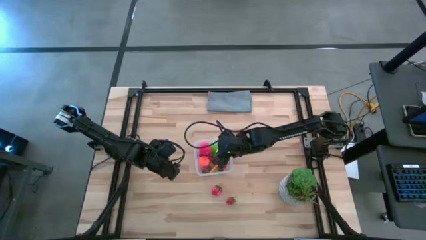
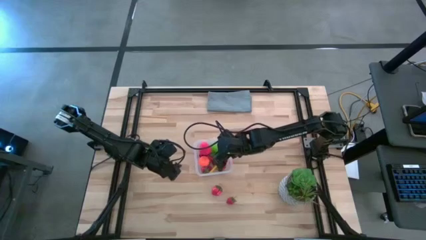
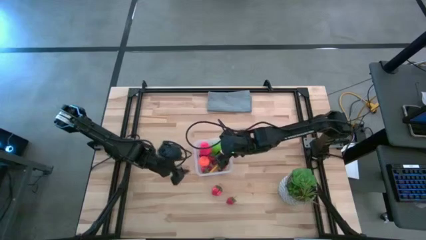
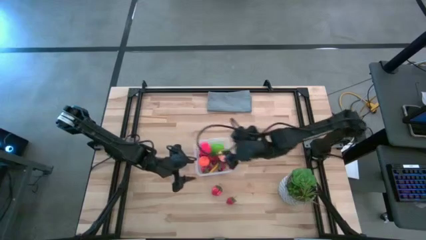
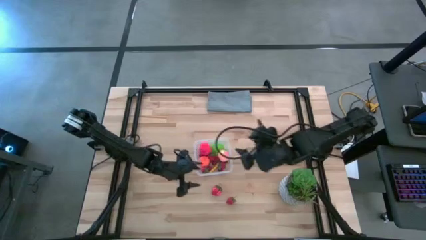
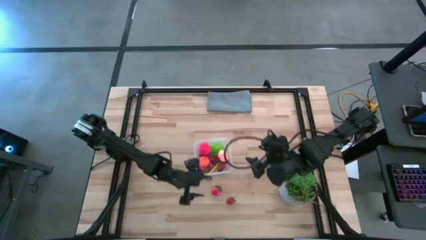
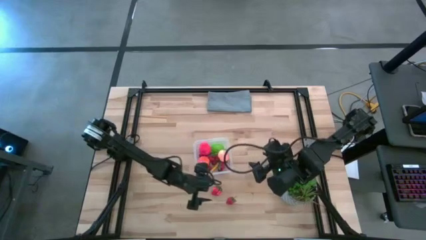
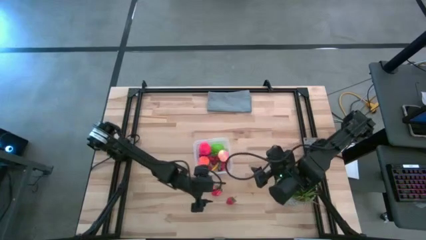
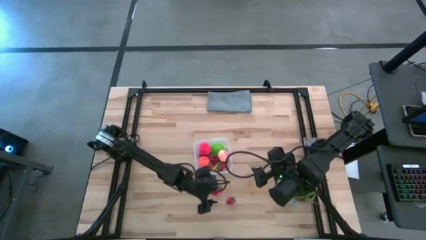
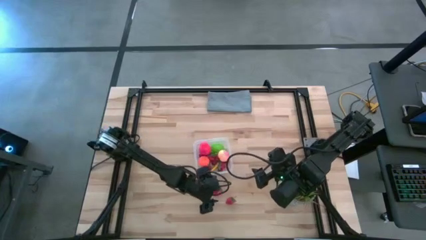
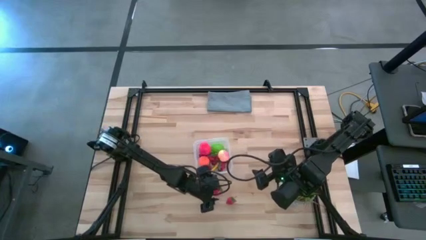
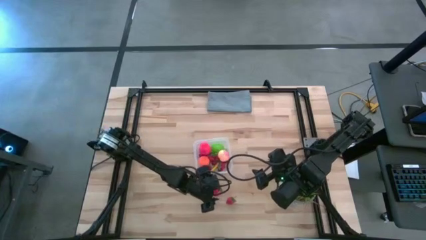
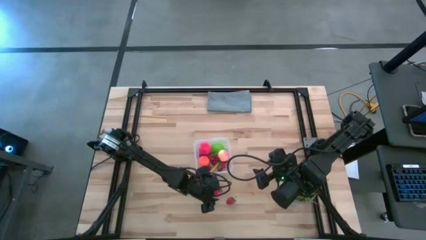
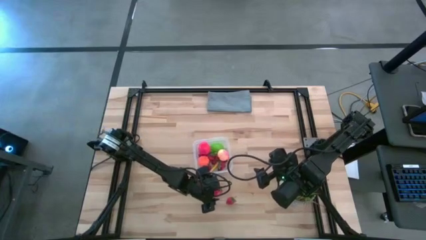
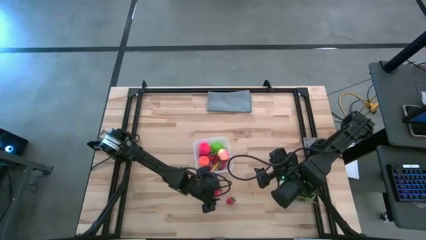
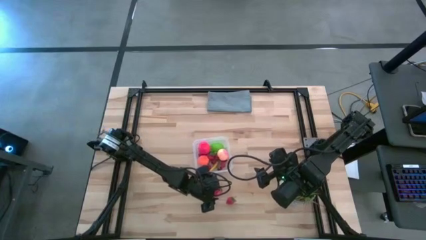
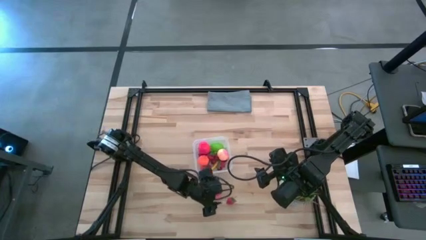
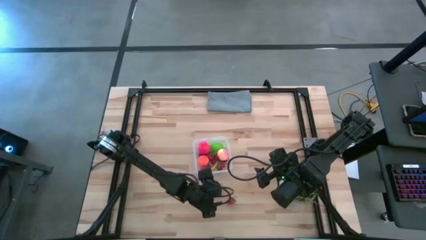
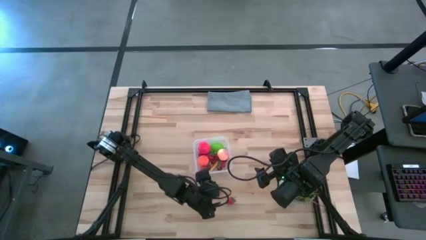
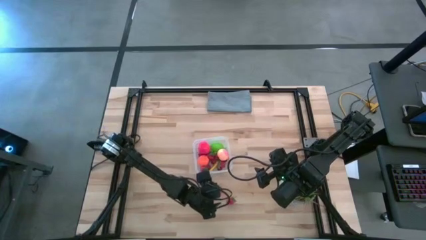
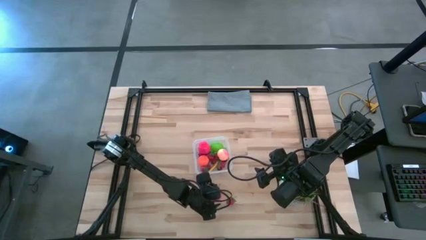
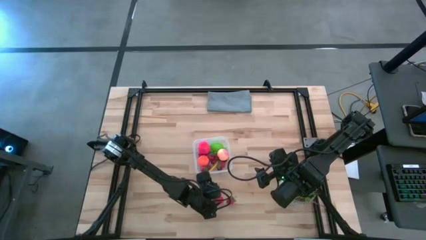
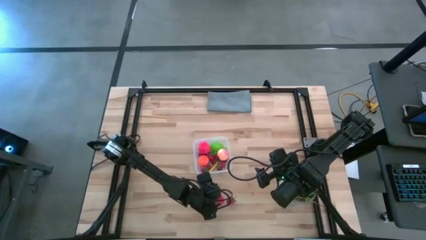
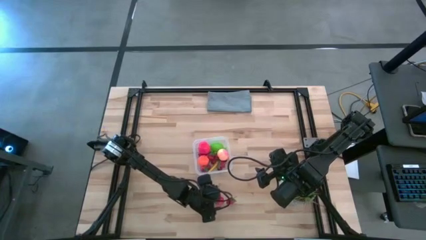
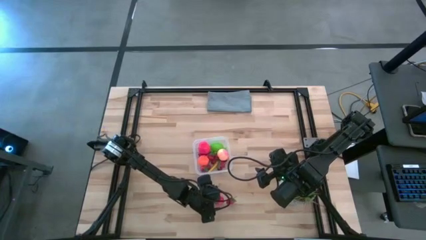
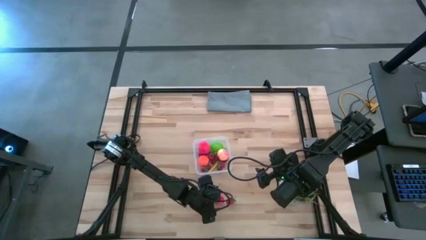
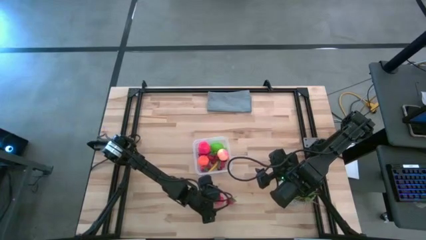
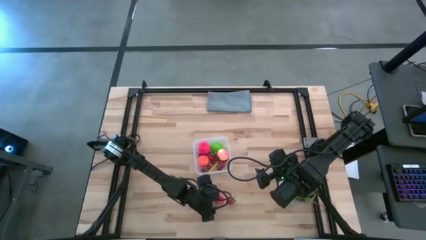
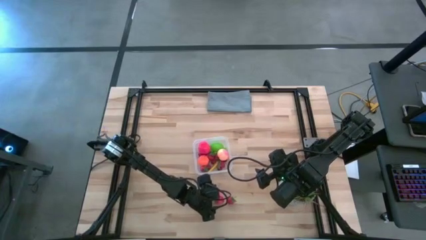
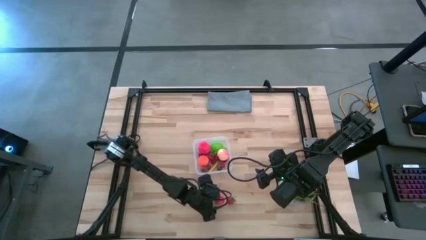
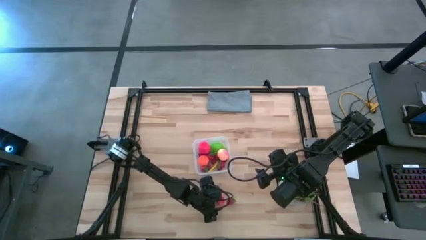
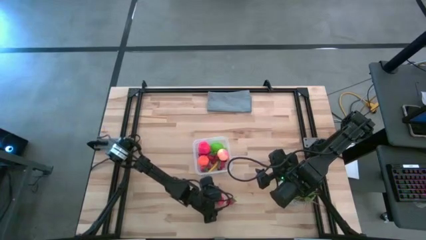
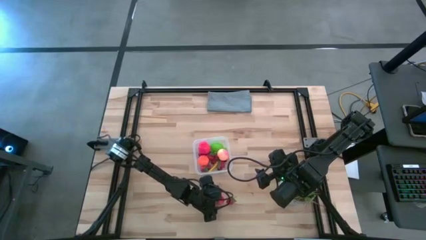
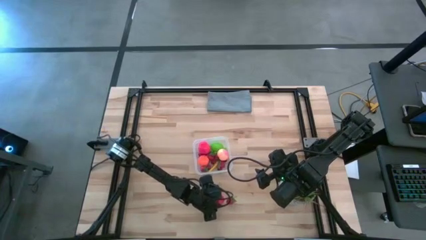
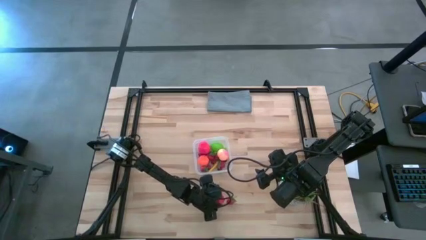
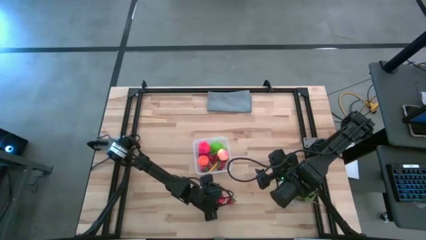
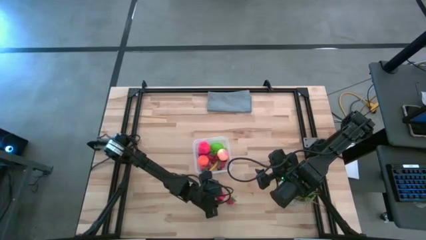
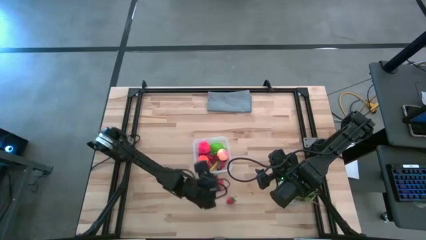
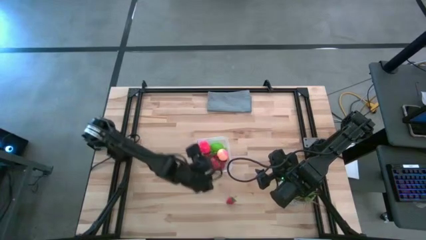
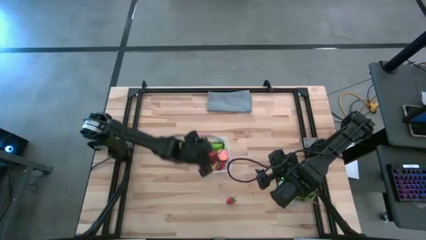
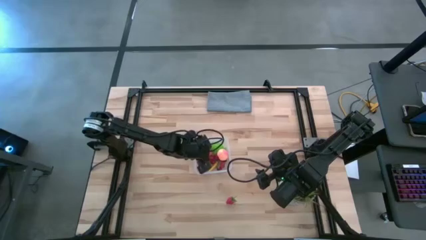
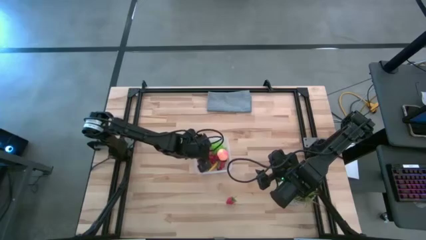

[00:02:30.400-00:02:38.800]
Task: Pick and placing Produce into tupperware
Put the red strawberry into the transparent container

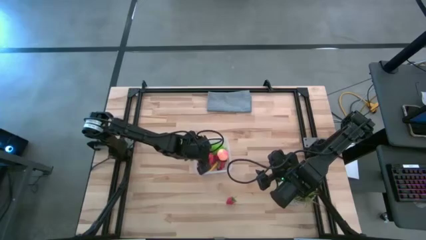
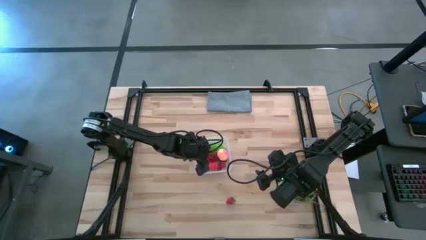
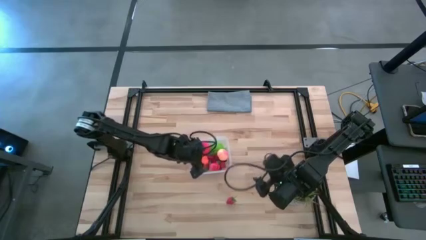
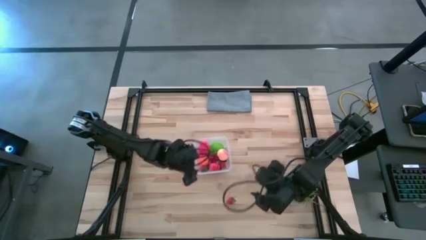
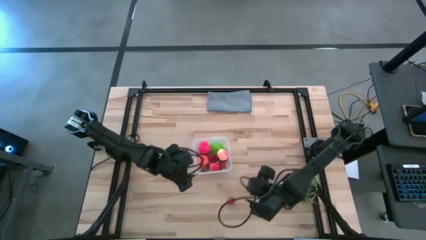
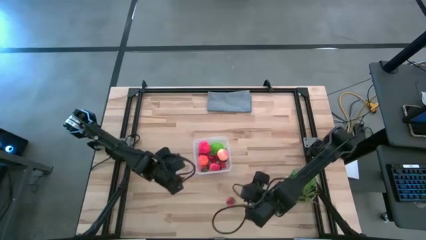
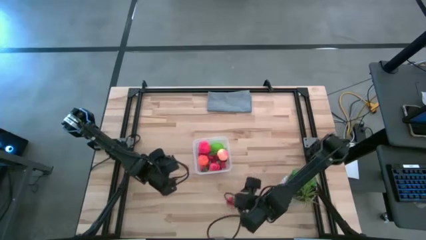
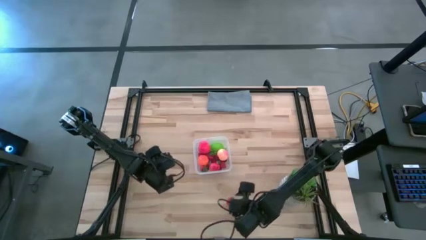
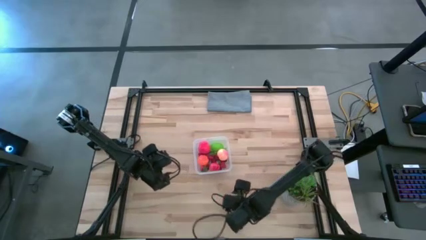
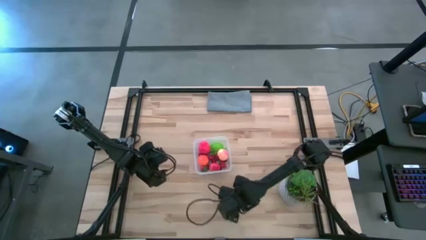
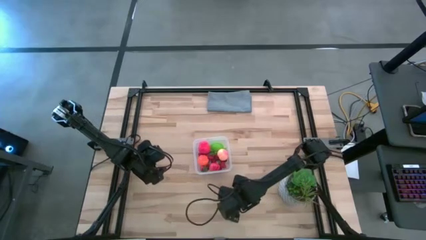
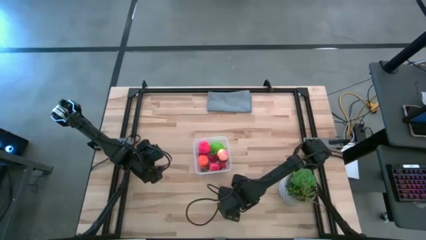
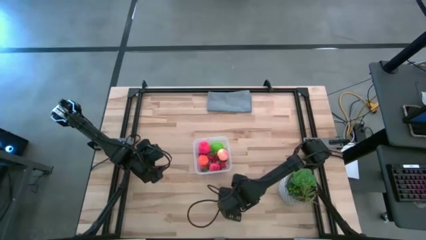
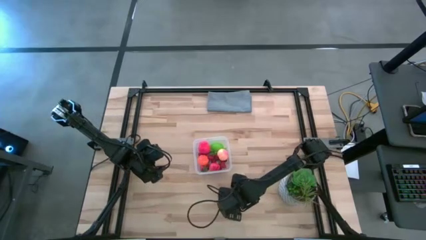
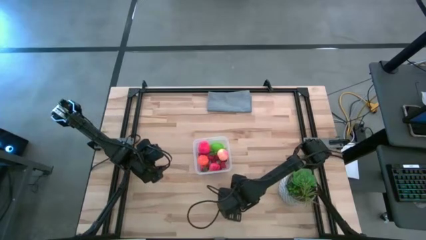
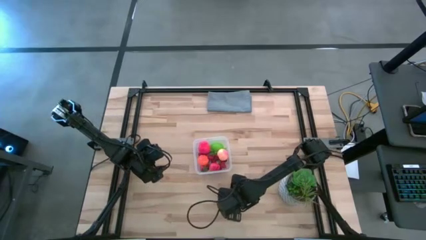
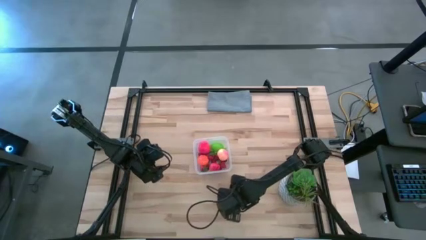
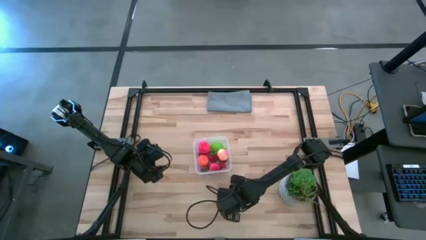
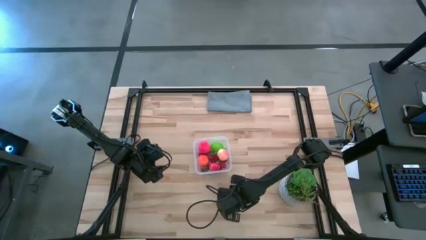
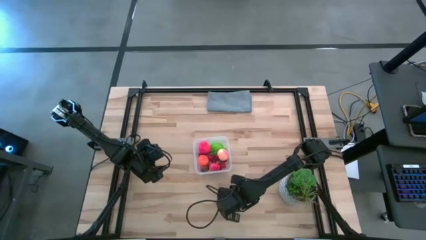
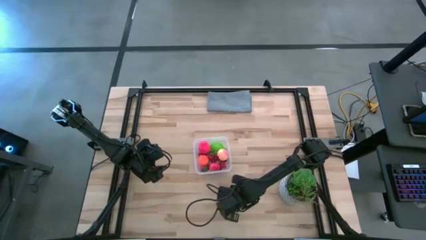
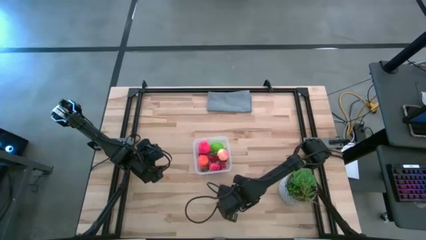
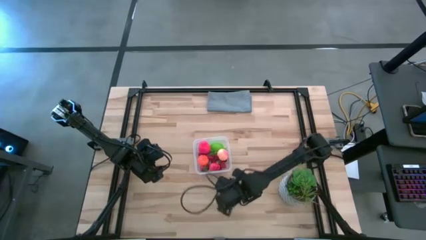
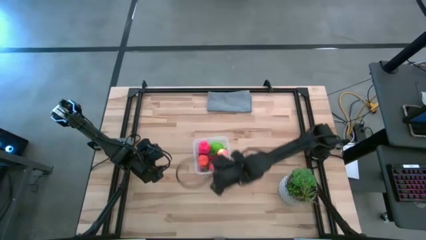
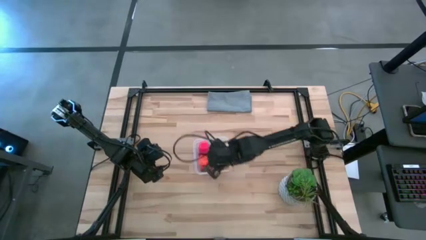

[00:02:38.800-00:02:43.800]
Put the red strawberry into the transparent container

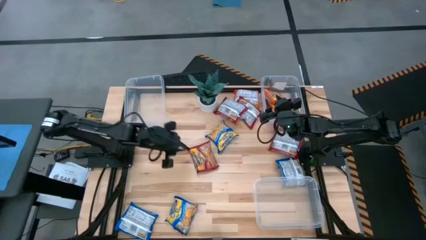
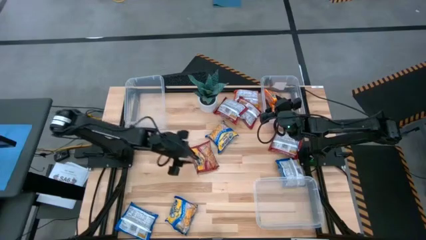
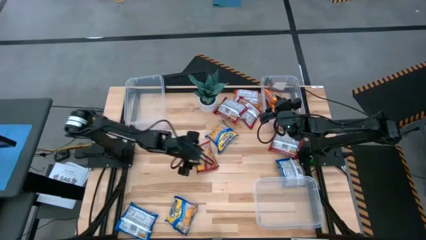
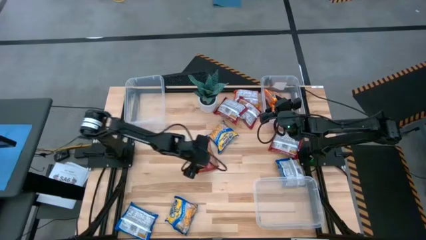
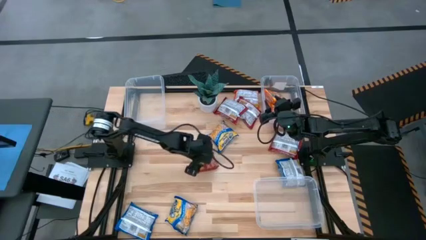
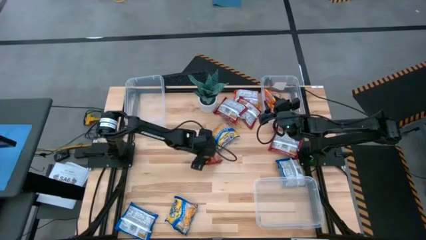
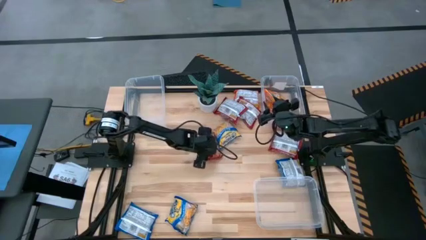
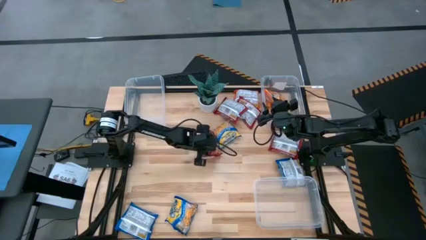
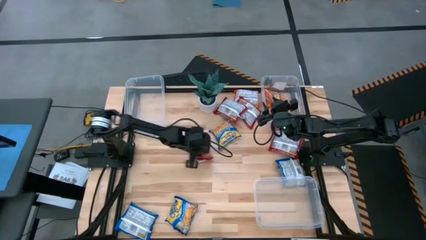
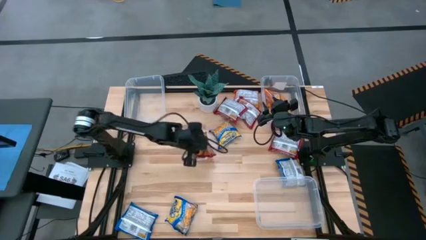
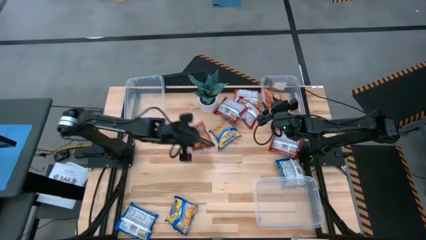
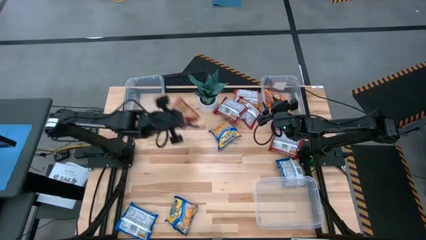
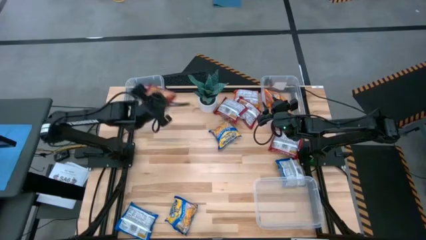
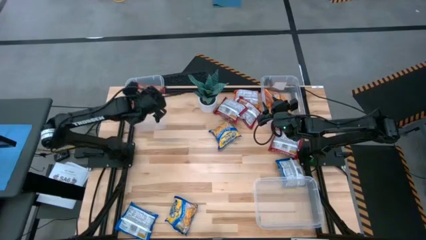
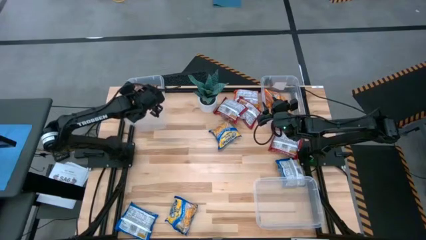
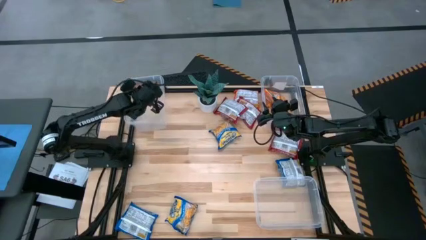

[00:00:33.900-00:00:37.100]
Task: Sort Maruchan noodles
Put the red noodle pack in the top left transparent bin
